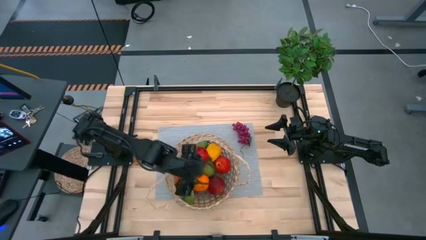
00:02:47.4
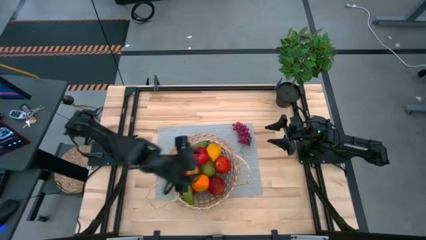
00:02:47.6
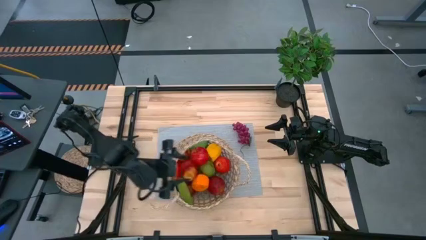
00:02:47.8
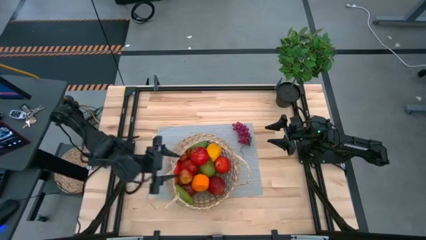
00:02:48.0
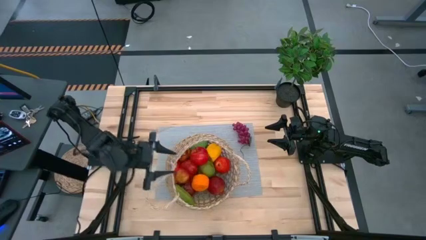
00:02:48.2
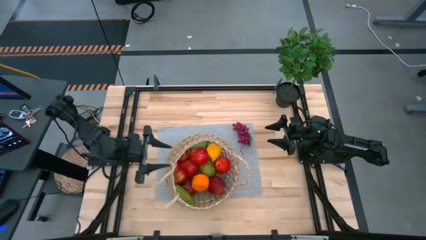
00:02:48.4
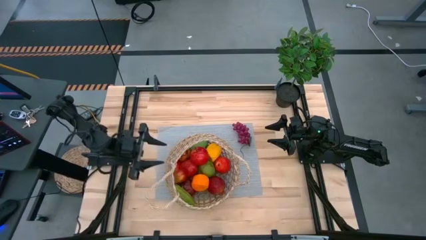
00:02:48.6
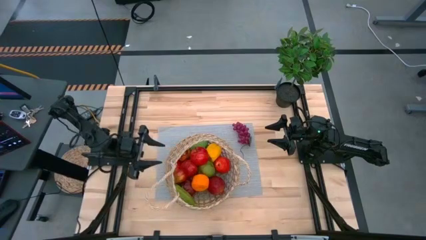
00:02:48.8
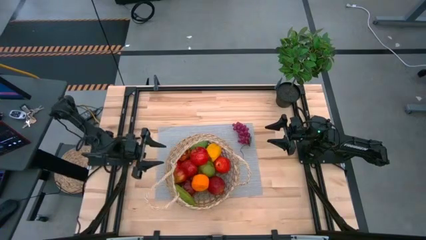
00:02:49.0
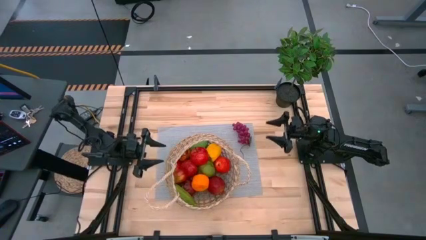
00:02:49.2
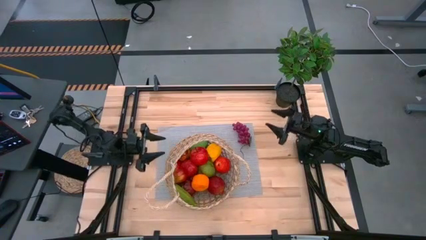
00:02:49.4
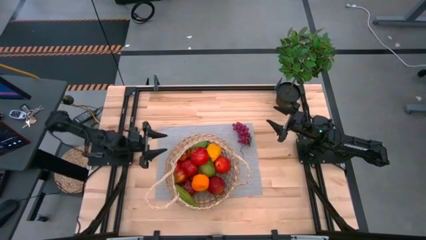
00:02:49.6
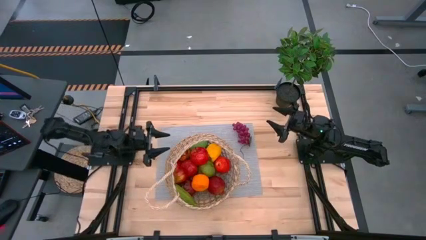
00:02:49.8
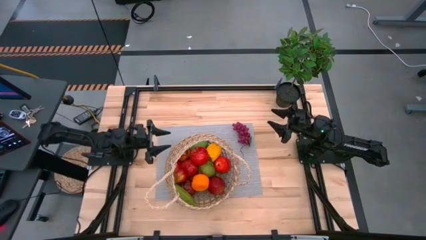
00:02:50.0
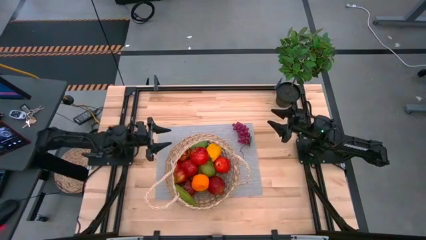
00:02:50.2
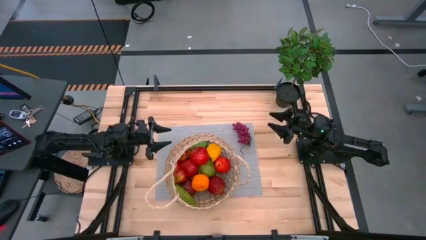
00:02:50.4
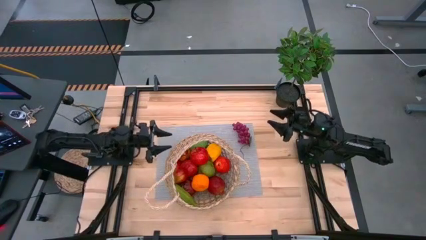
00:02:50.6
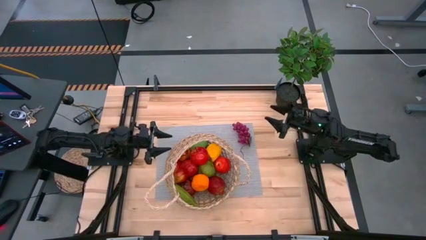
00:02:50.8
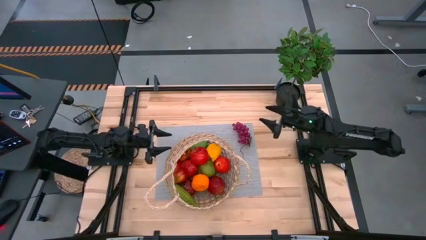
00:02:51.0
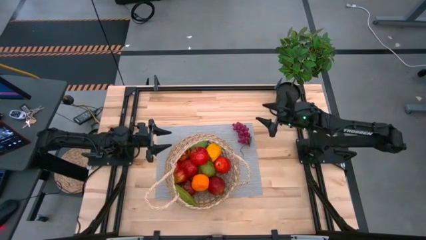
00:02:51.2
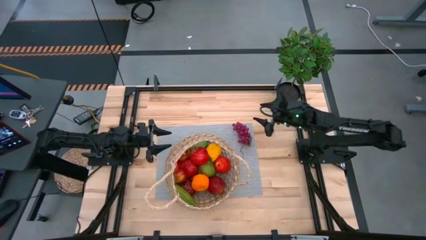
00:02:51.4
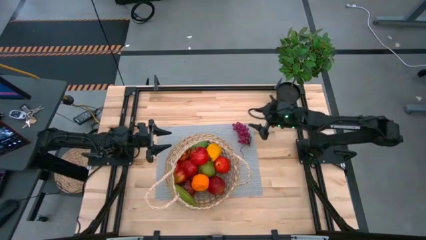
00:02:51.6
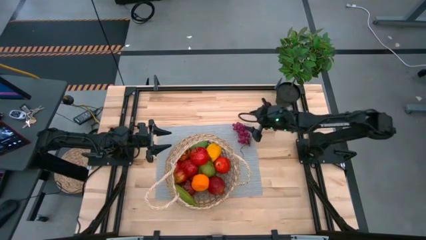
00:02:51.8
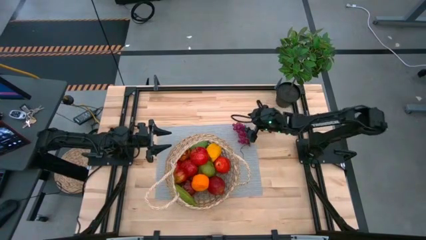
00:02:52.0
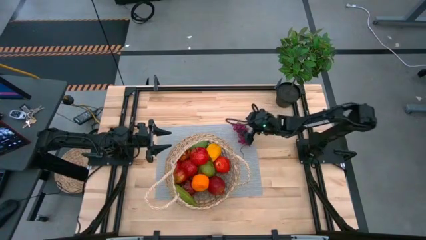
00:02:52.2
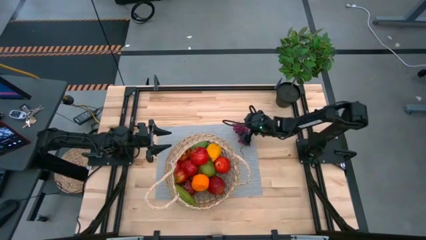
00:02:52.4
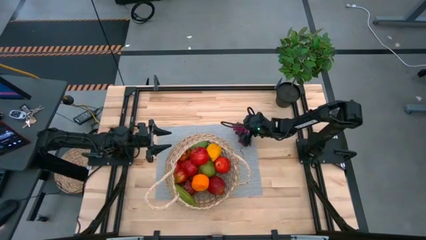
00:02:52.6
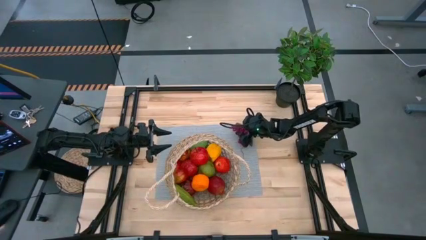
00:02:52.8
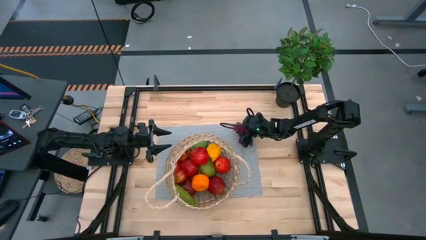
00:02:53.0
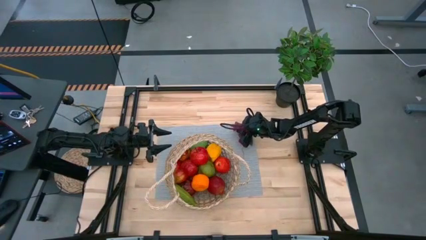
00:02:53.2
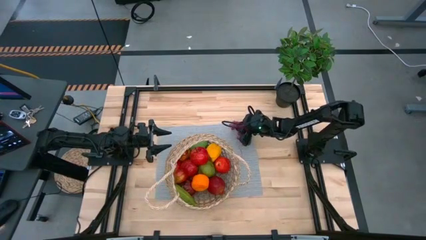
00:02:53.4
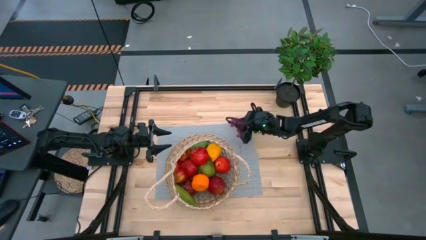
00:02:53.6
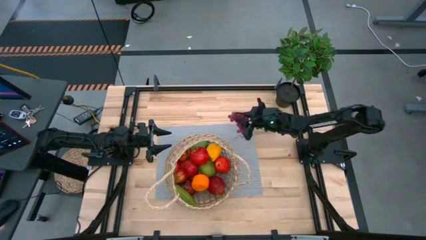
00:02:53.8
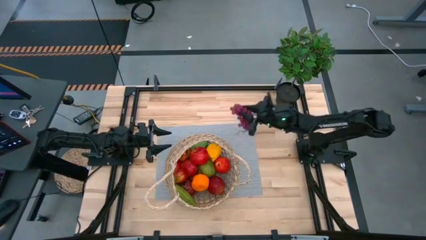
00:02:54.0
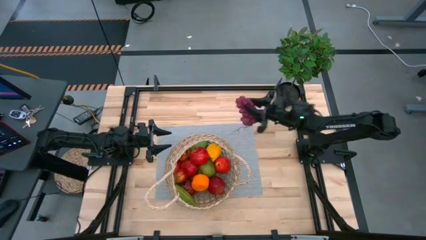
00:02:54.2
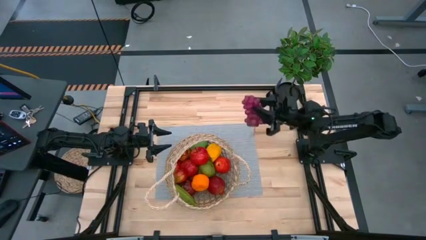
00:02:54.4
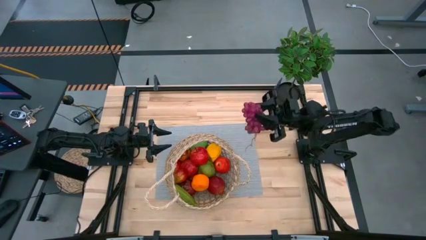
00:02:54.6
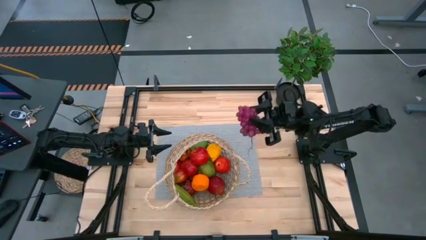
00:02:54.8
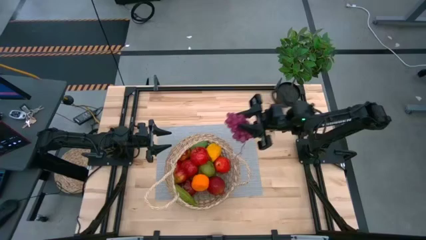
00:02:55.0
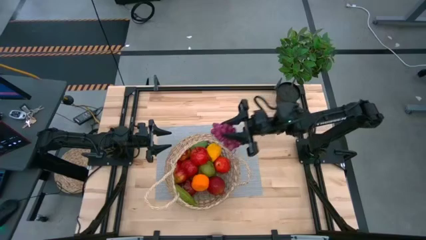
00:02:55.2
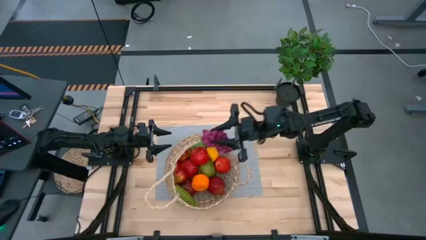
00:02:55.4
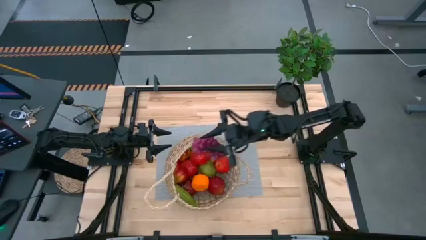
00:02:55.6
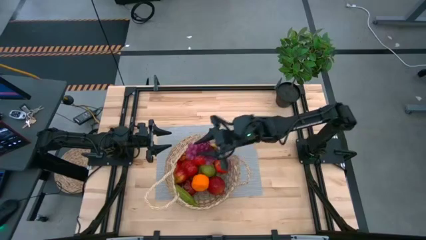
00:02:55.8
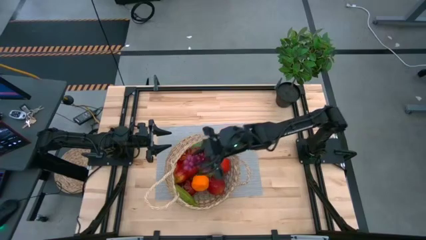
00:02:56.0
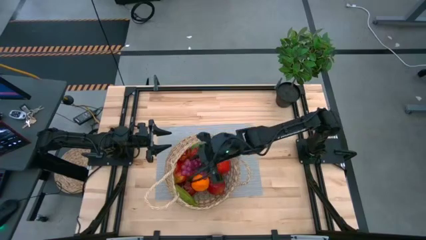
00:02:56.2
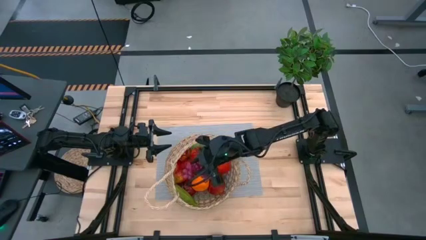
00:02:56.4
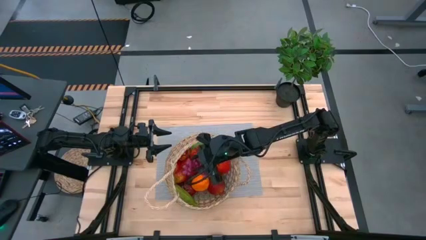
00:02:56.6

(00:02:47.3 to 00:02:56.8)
Task: Build produce basket
Put the purple grapes into the brown basket

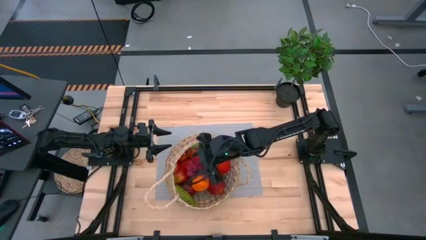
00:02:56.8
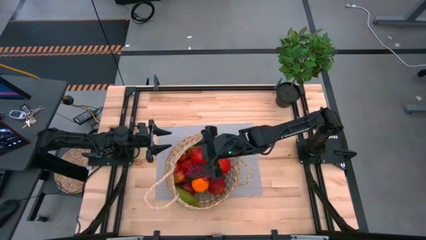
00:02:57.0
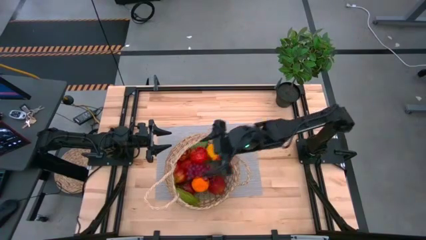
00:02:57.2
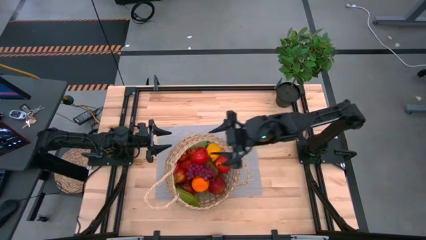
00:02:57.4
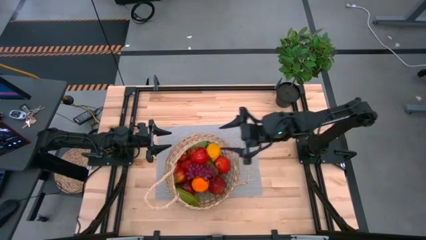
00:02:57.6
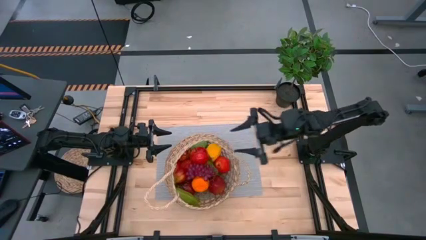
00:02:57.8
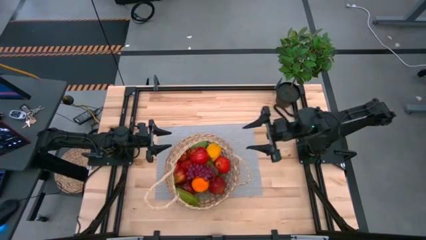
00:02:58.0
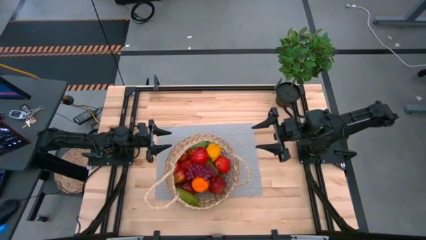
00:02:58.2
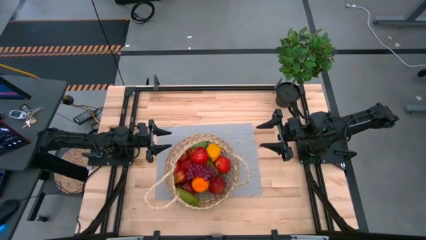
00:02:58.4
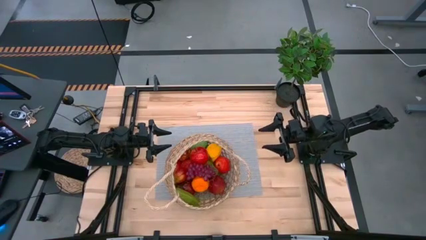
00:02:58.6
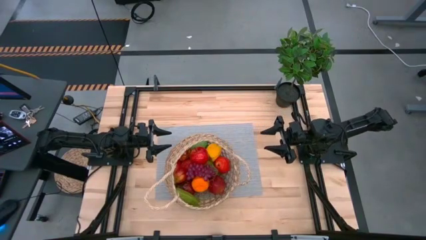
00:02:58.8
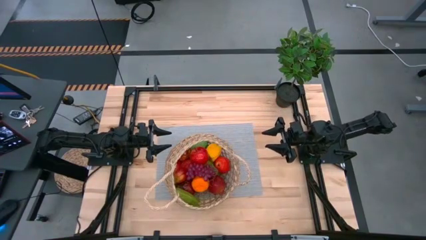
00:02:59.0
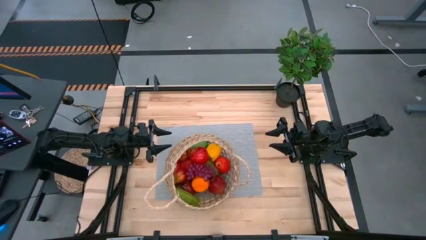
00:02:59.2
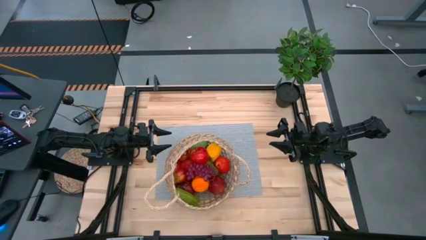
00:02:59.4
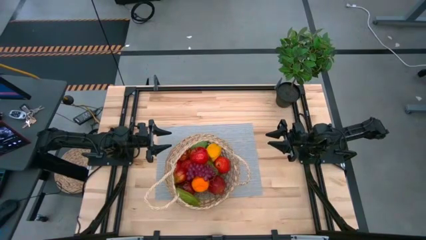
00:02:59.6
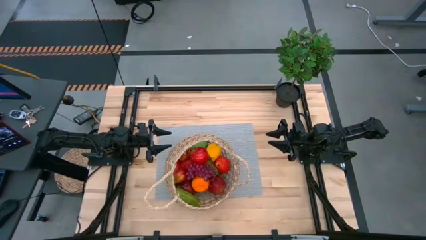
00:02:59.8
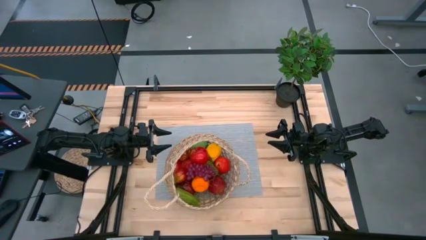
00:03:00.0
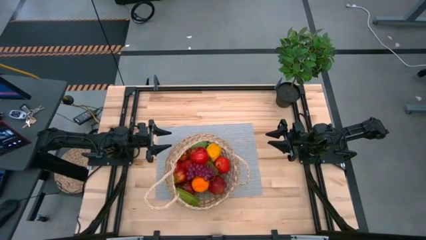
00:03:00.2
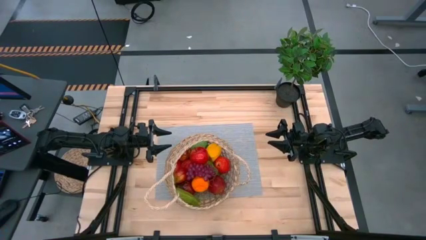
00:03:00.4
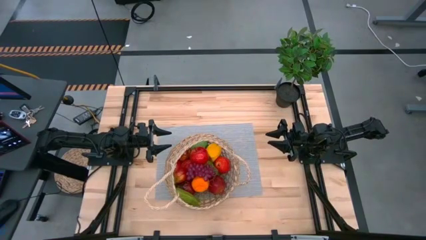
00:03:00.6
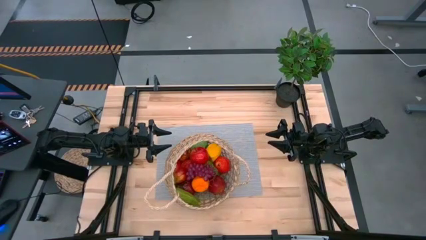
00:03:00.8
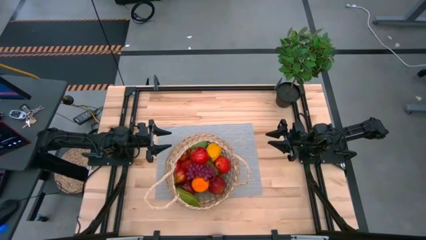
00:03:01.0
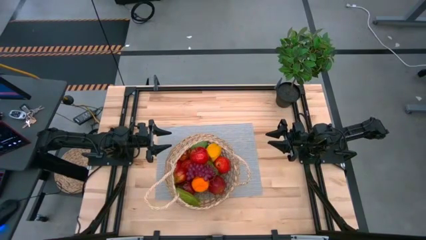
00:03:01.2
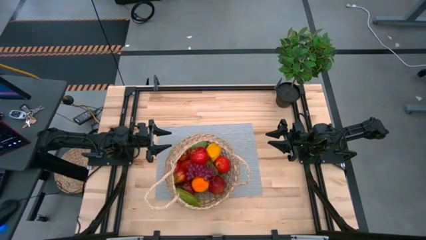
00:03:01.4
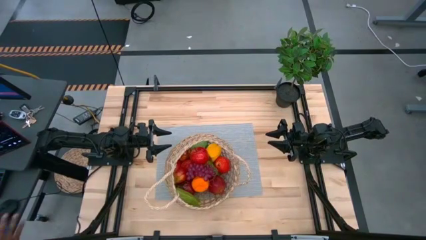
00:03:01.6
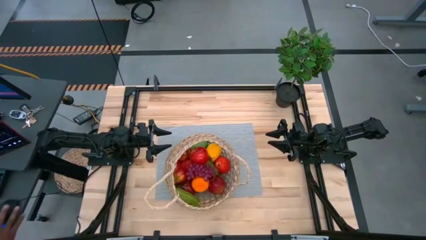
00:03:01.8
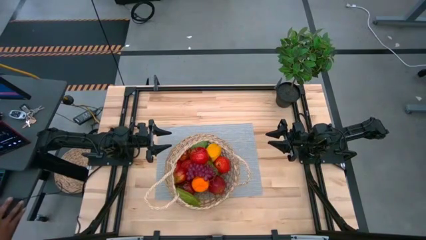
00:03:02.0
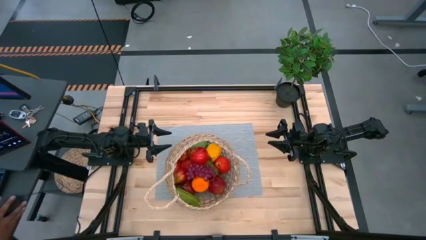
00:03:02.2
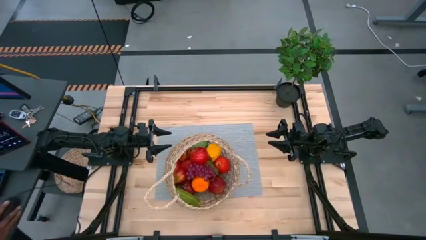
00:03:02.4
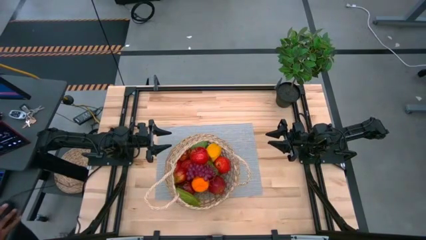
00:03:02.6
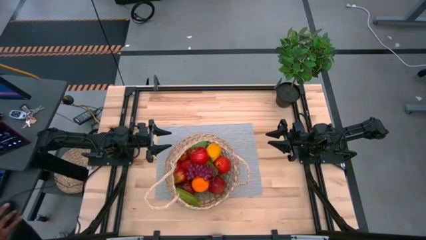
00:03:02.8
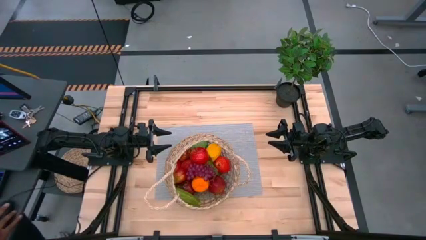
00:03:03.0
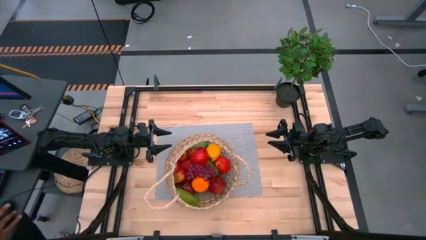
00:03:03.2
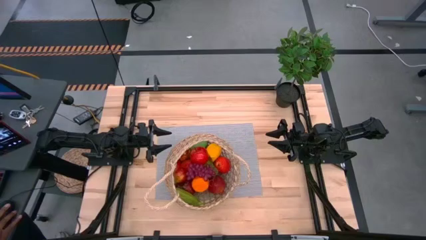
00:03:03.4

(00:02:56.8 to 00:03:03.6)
Return to Home Position

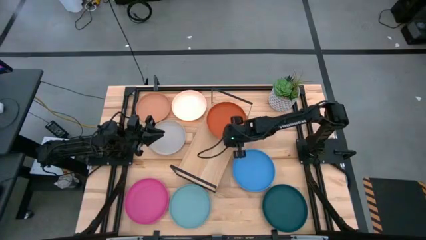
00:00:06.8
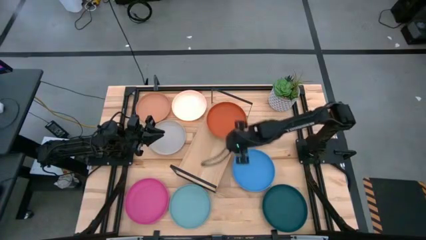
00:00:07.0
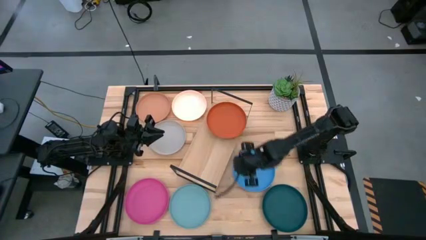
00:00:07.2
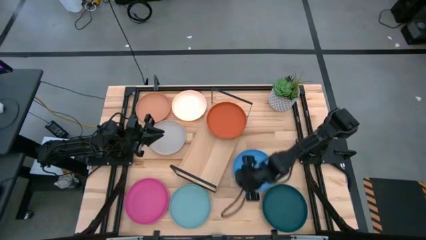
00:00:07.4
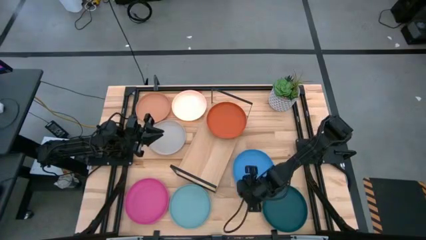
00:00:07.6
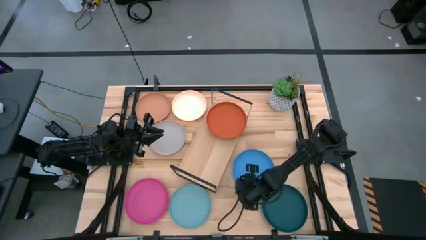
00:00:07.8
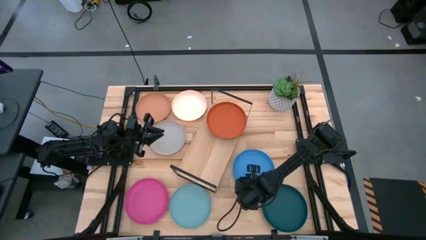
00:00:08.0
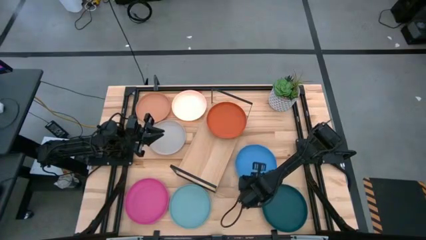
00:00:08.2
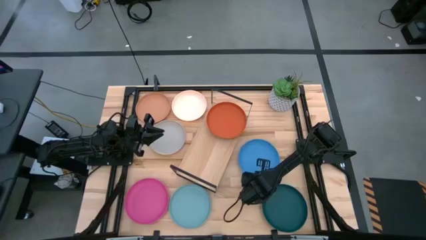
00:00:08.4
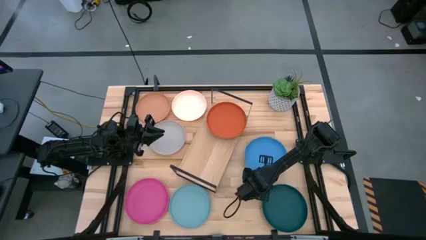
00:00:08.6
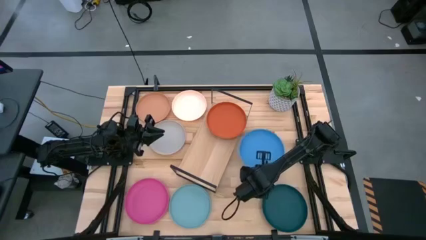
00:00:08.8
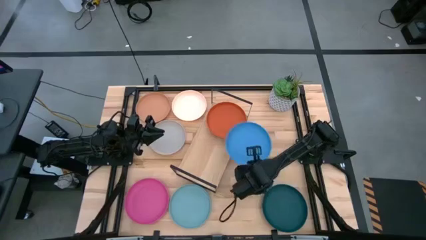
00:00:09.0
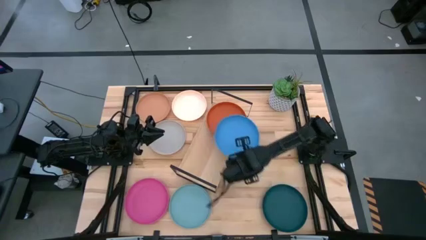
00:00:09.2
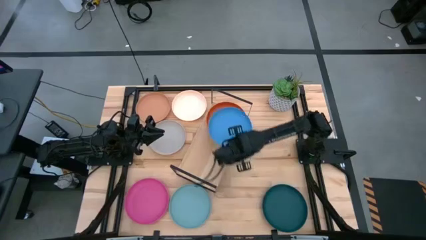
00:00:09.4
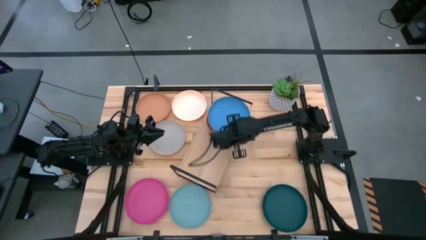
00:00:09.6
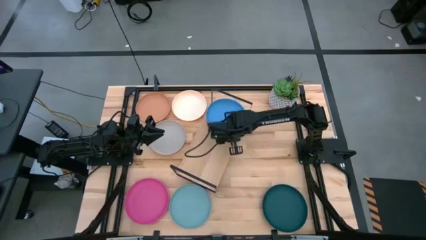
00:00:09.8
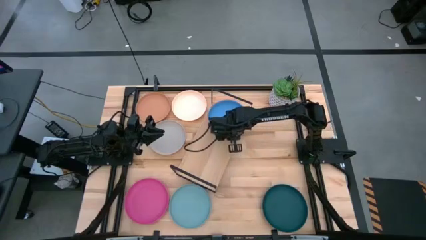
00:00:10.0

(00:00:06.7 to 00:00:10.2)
Task: Place and stack plates onto a shelf
Stack the blue plate on top of the orange plate on the shelf
